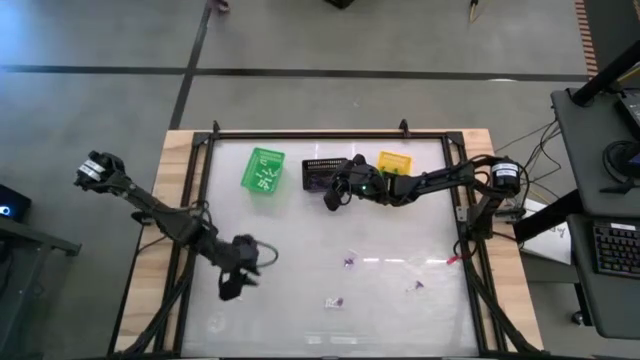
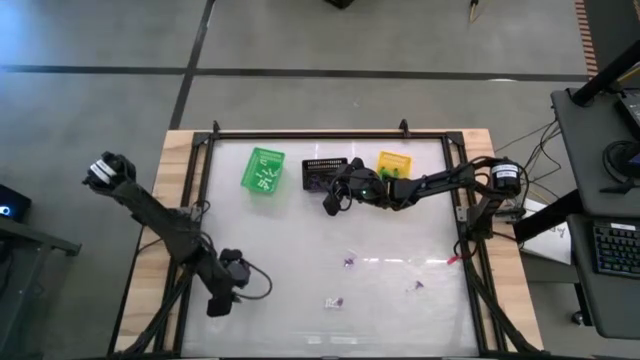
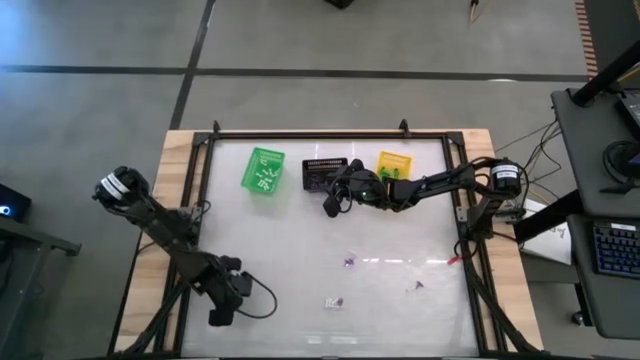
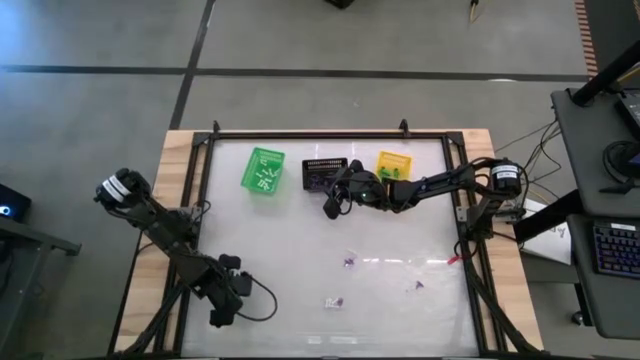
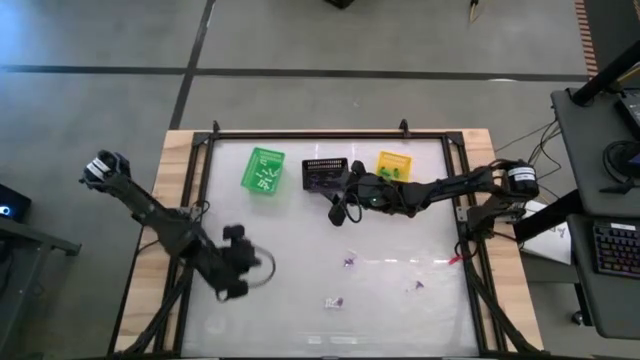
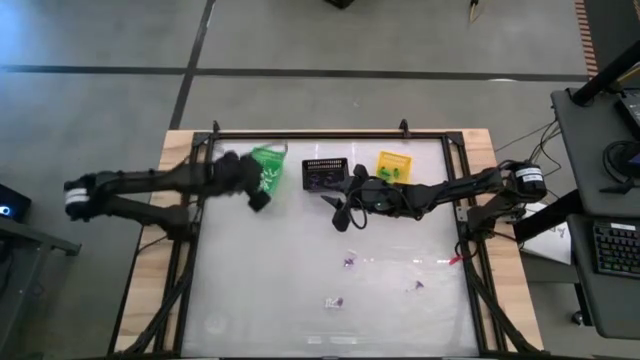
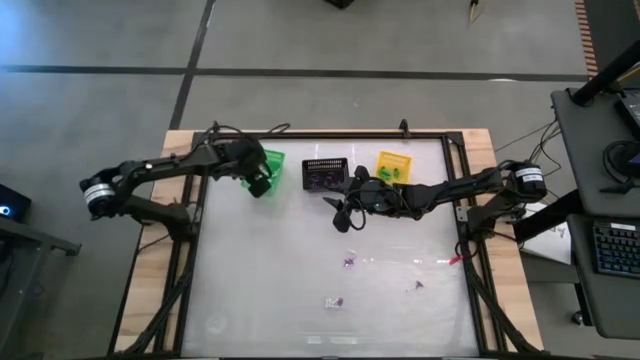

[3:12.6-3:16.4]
Task: Sort Halloween decoration
Put the white bone toy into the green basket

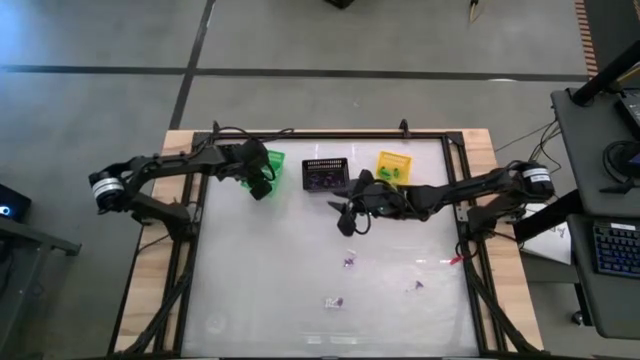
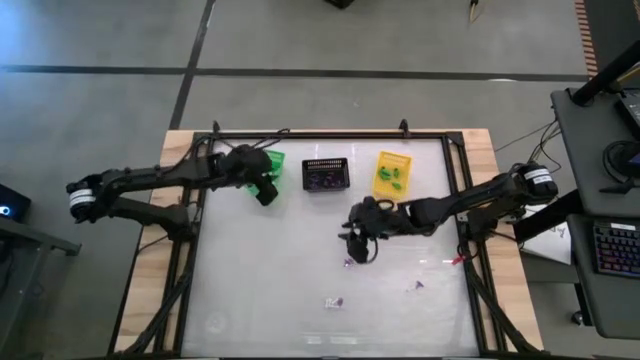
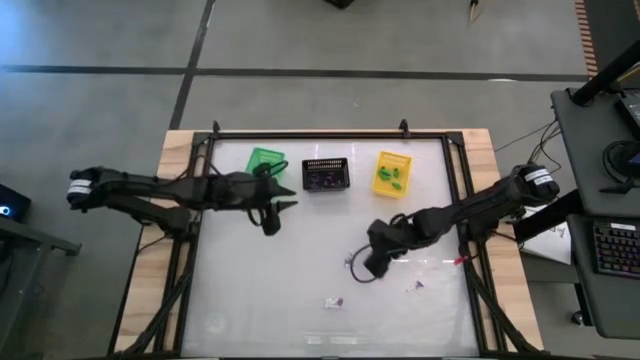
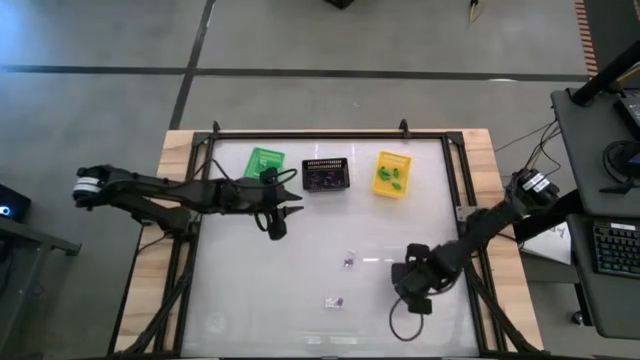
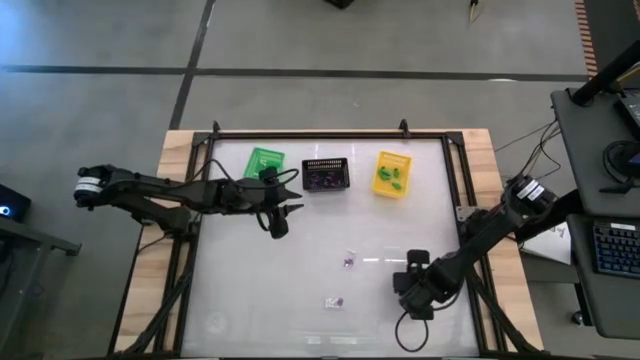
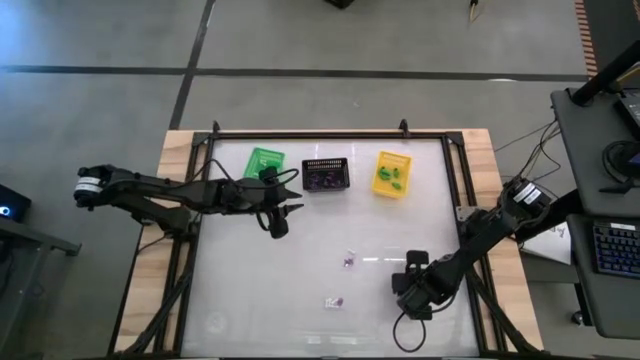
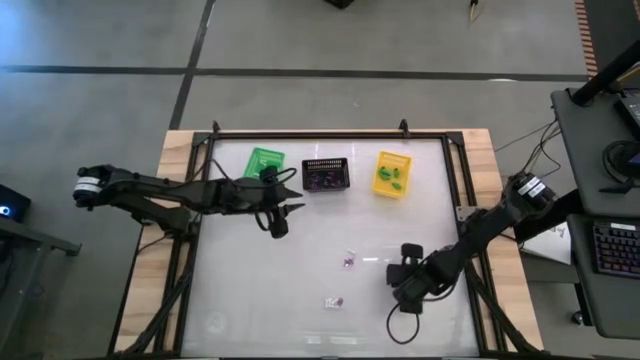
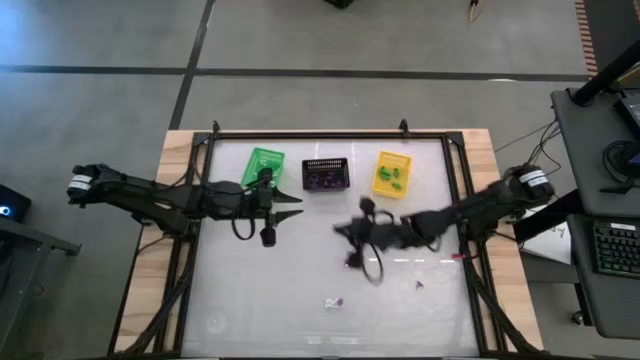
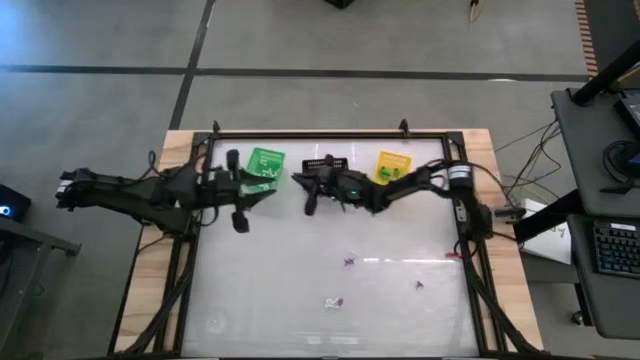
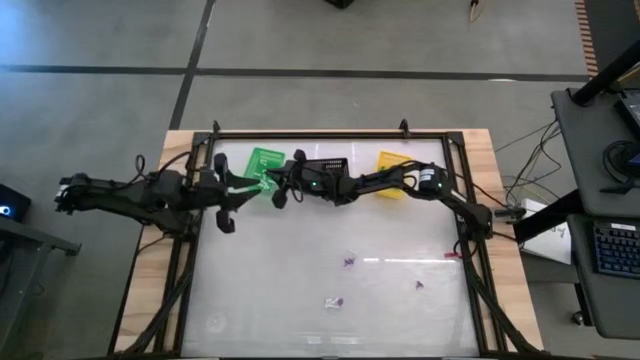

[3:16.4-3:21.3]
Put the white bone toy into the green basket

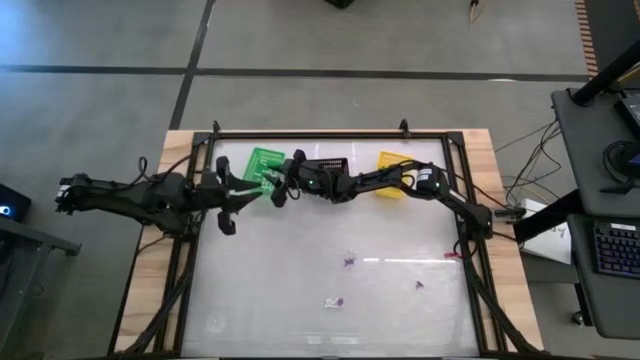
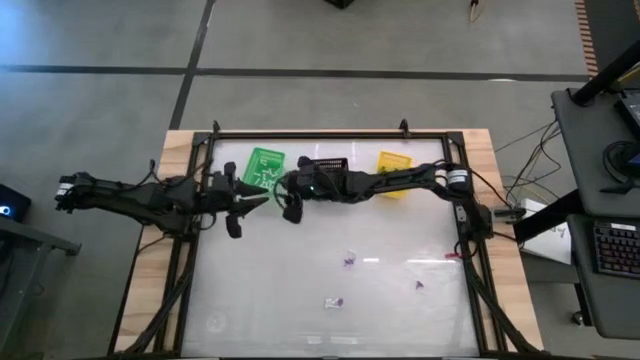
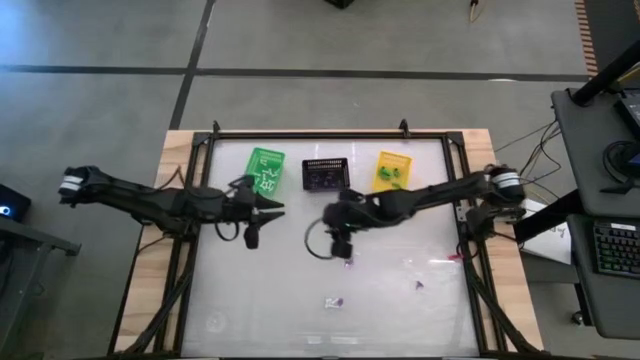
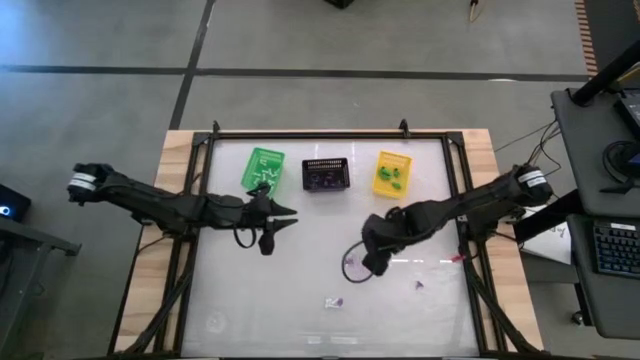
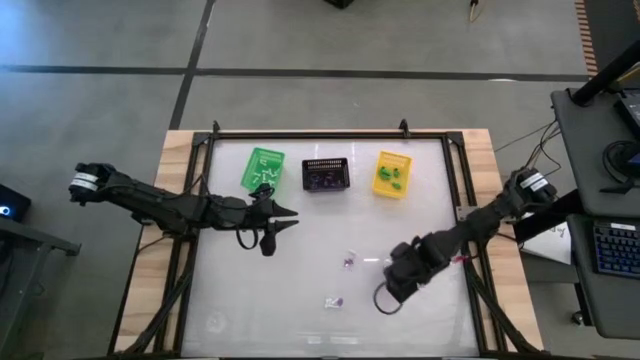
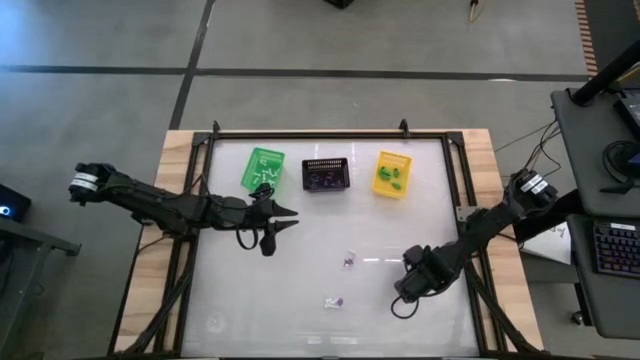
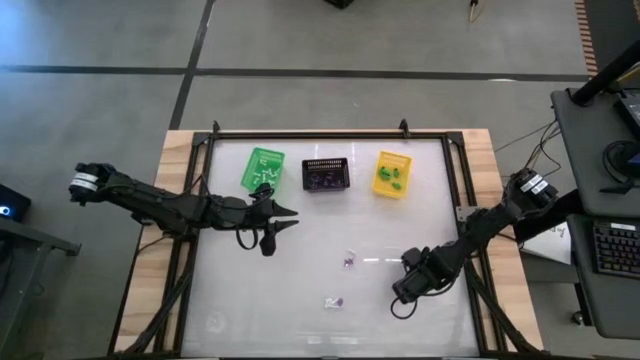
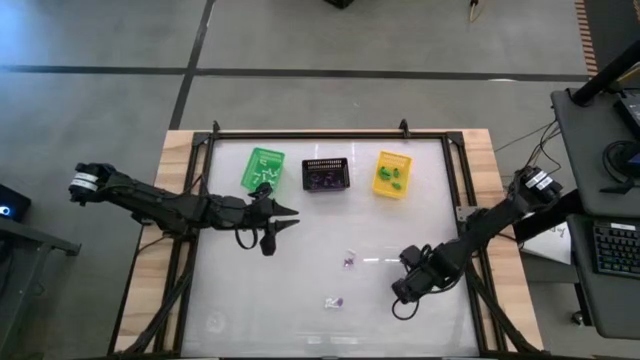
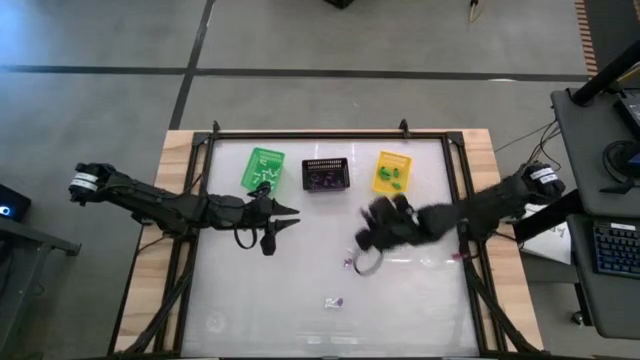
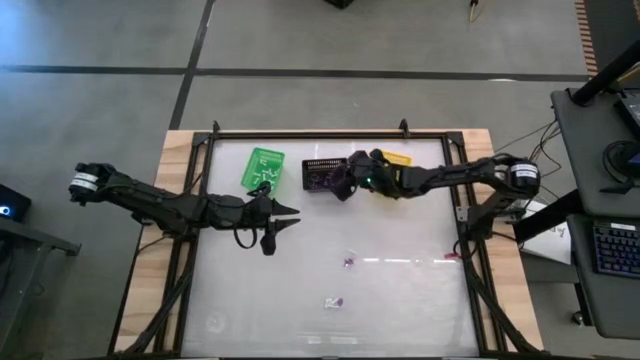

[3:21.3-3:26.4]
Put the purple witch hat toy into the black basket

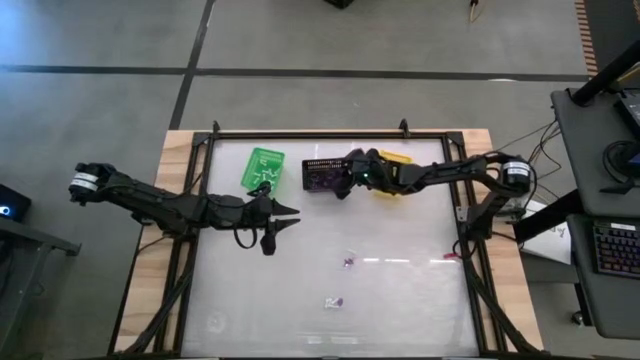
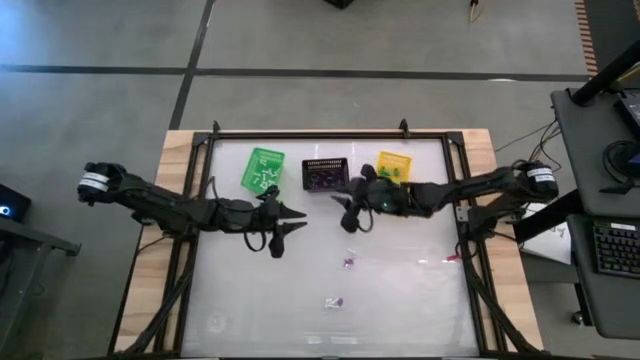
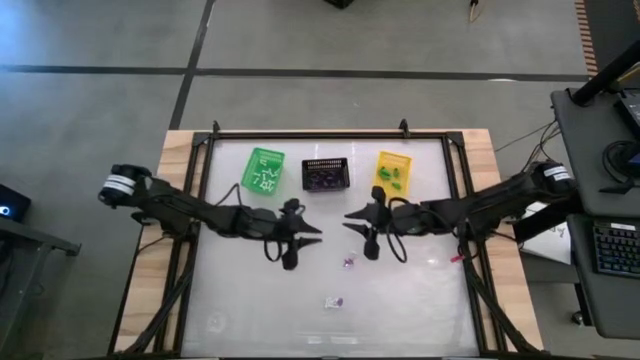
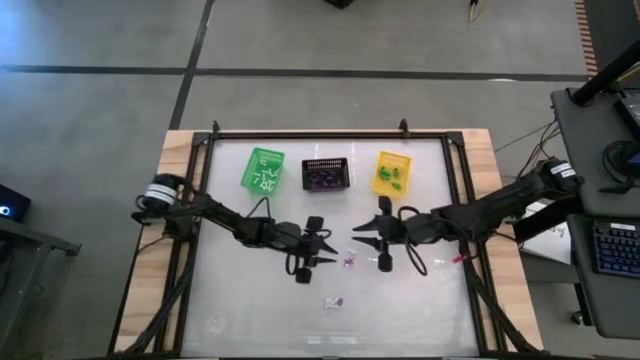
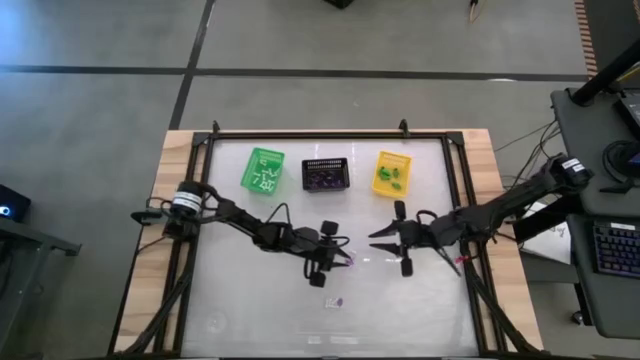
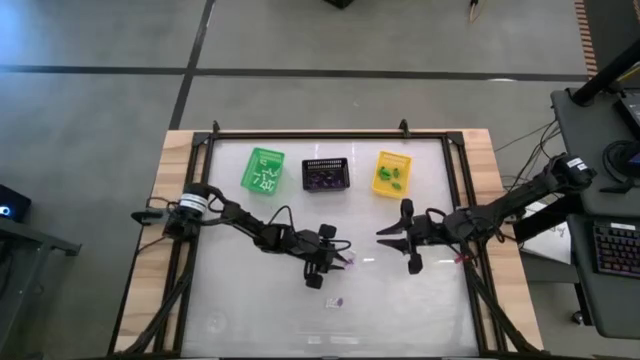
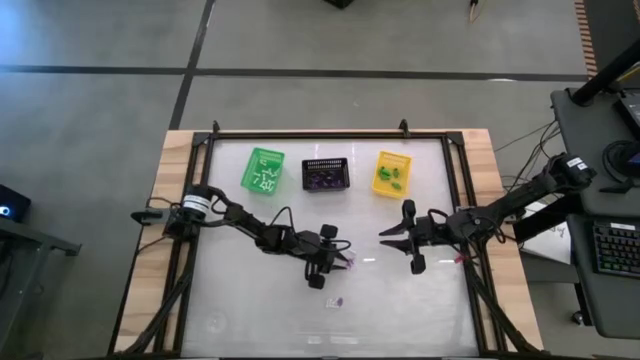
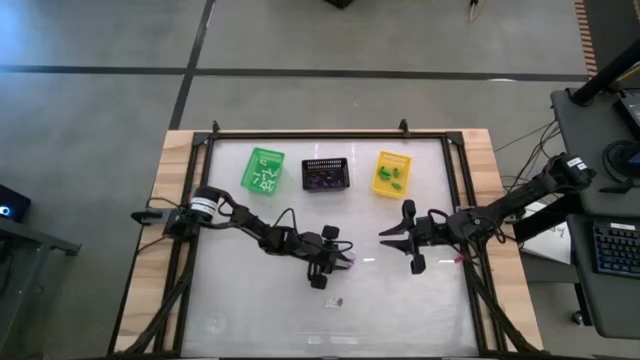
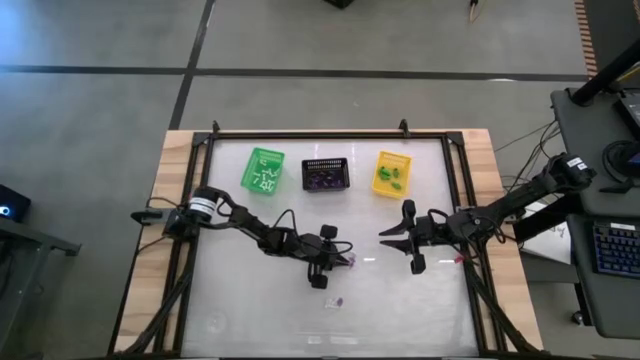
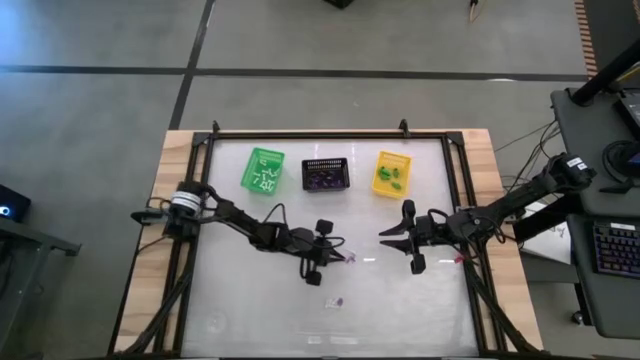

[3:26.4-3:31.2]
Put the purple witch hat toy into the black basket

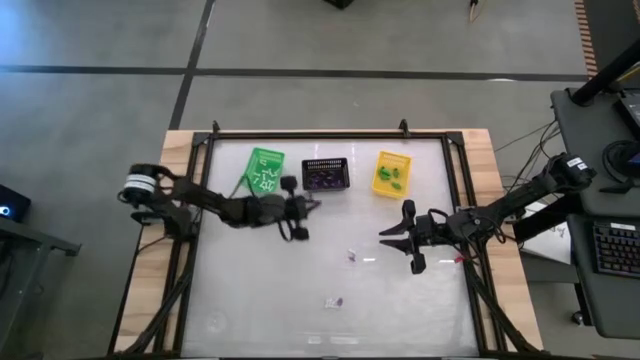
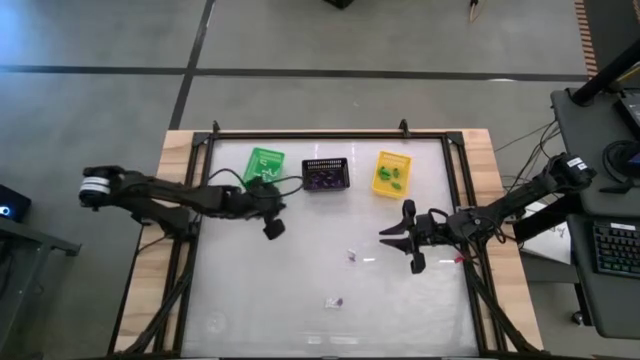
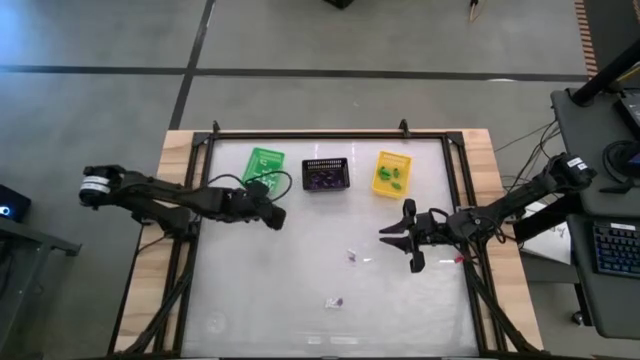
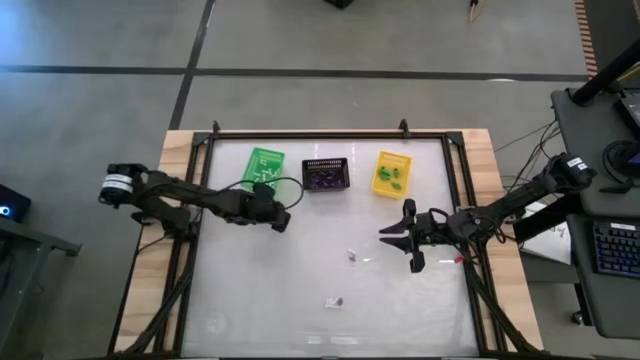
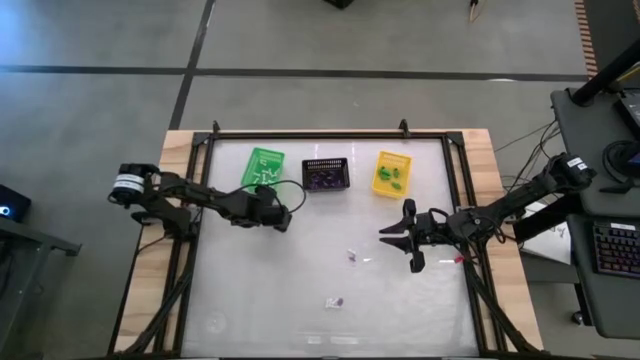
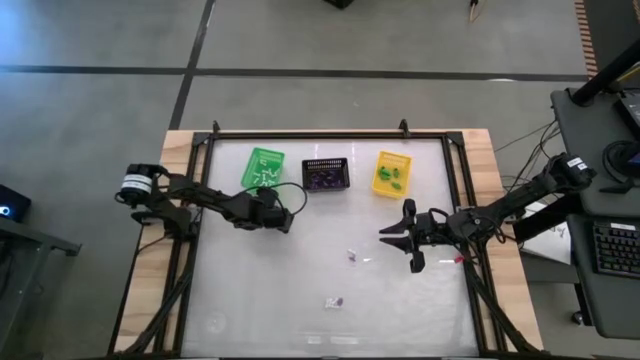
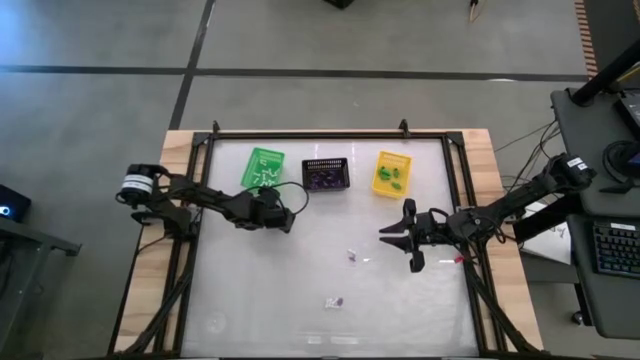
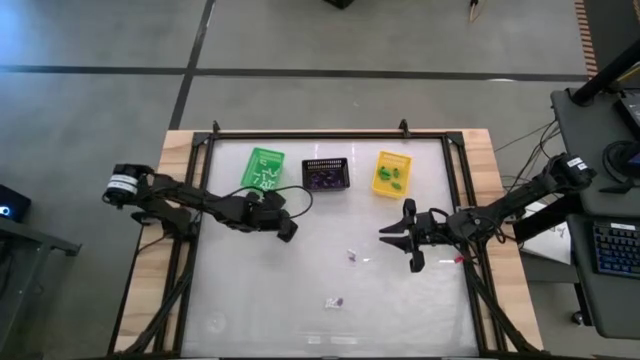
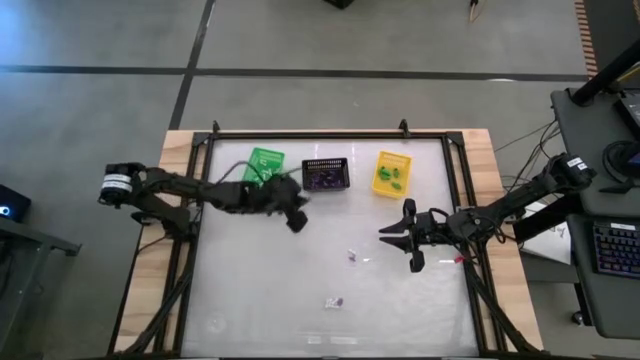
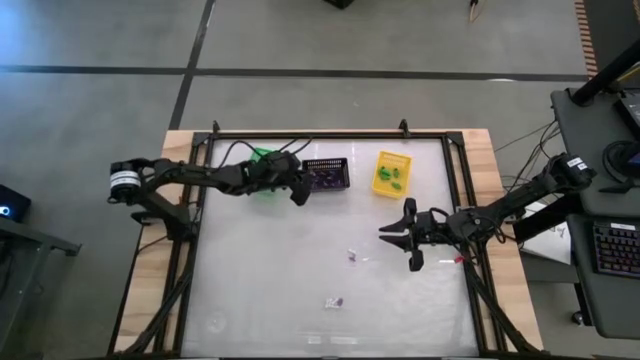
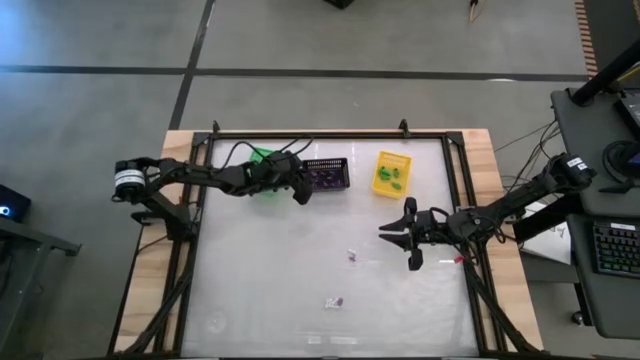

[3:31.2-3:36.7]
Put the purple witch hat toy into the black basket
